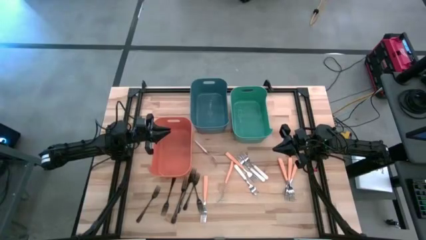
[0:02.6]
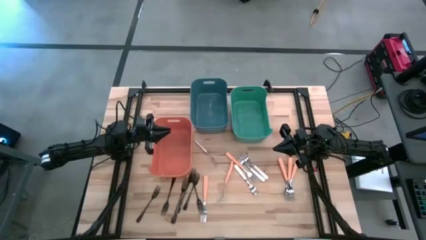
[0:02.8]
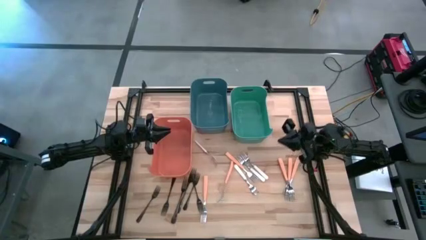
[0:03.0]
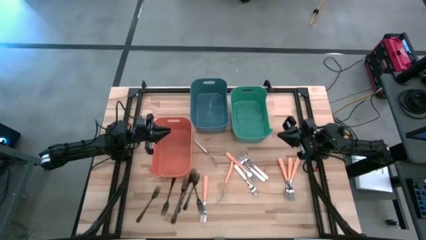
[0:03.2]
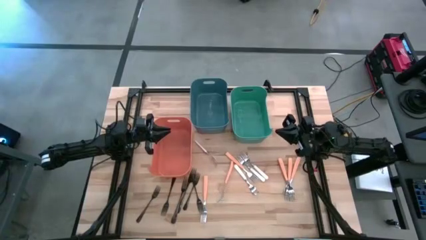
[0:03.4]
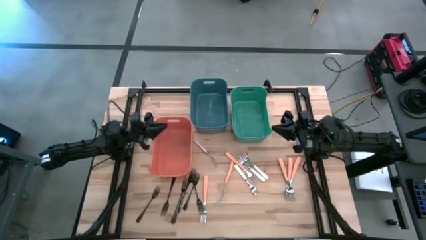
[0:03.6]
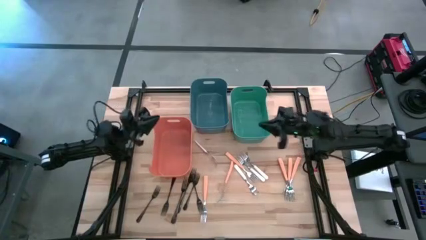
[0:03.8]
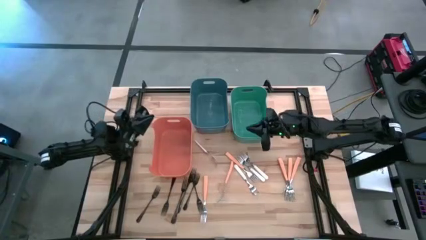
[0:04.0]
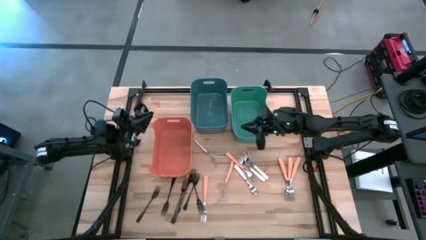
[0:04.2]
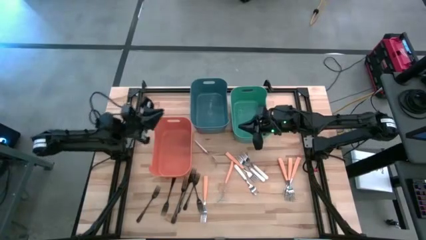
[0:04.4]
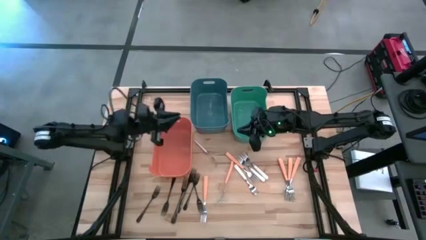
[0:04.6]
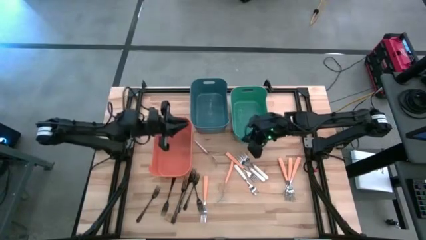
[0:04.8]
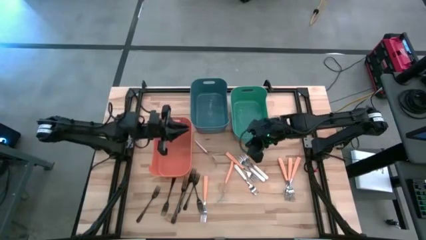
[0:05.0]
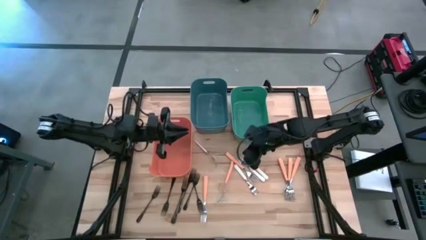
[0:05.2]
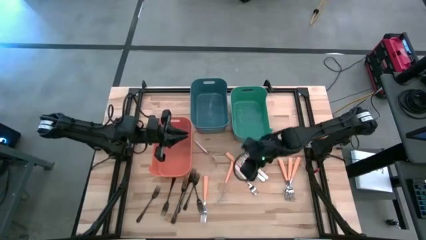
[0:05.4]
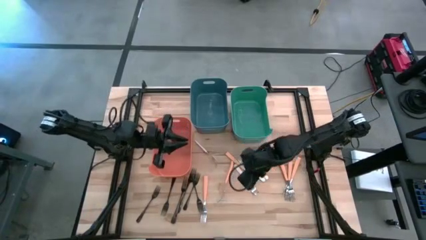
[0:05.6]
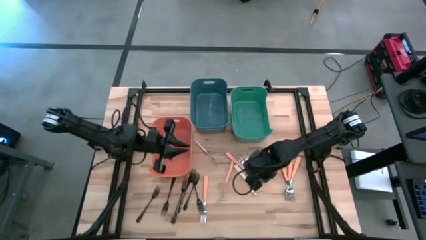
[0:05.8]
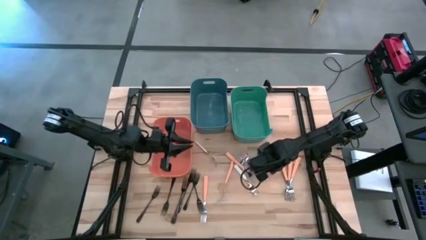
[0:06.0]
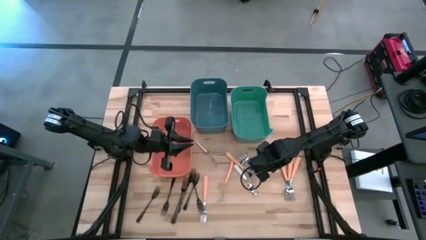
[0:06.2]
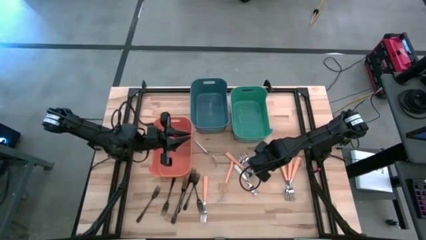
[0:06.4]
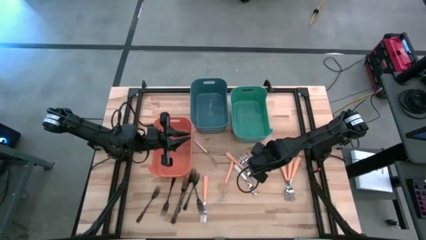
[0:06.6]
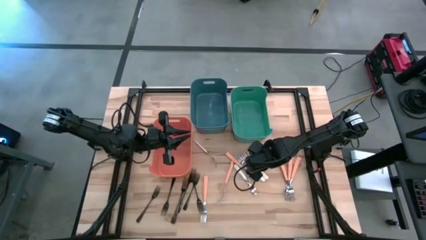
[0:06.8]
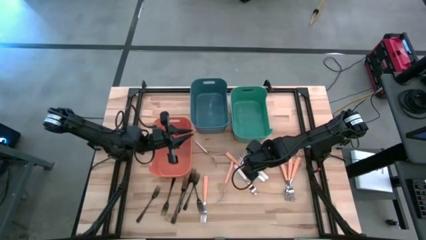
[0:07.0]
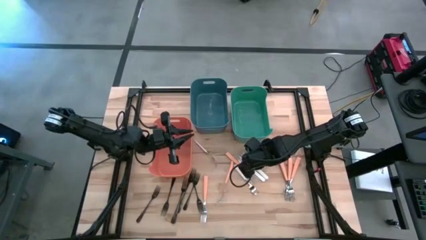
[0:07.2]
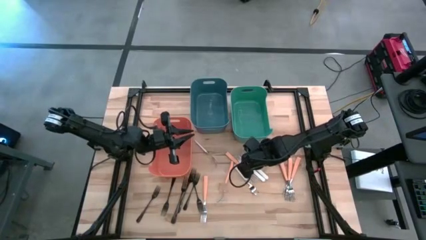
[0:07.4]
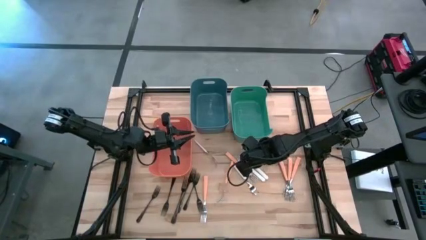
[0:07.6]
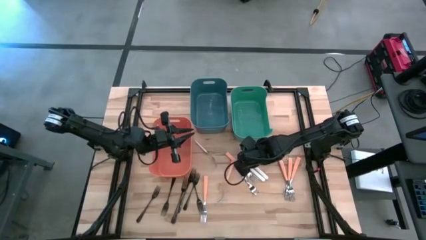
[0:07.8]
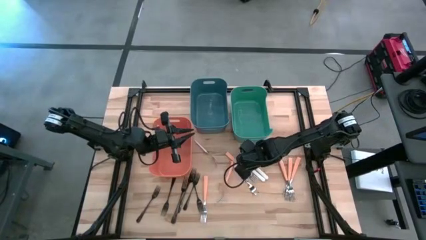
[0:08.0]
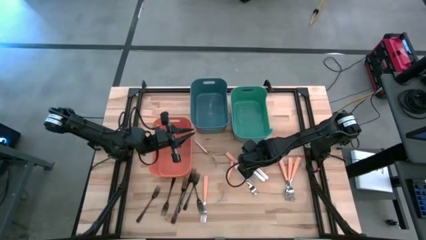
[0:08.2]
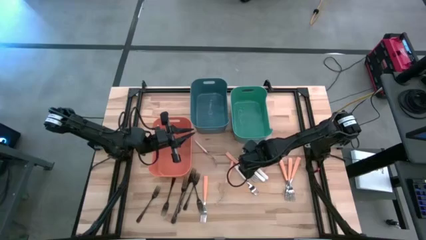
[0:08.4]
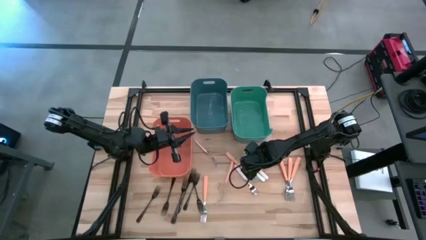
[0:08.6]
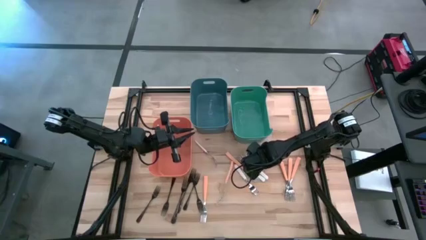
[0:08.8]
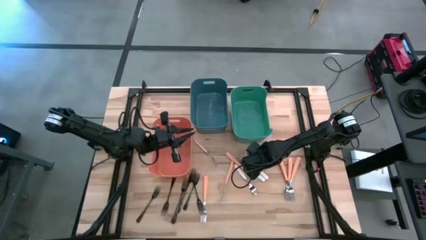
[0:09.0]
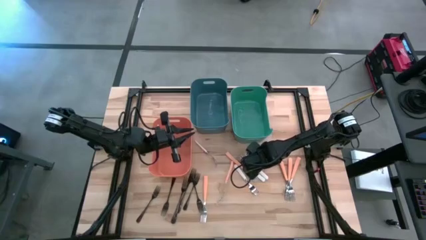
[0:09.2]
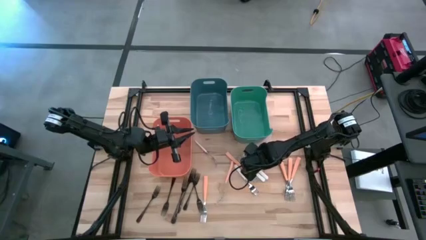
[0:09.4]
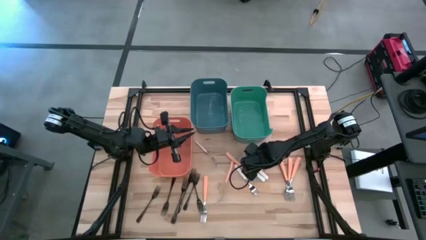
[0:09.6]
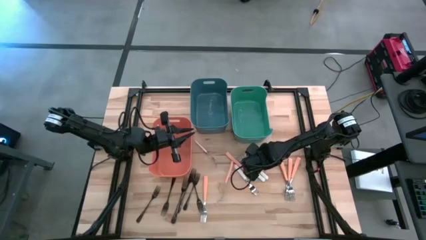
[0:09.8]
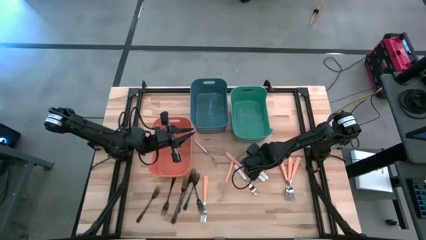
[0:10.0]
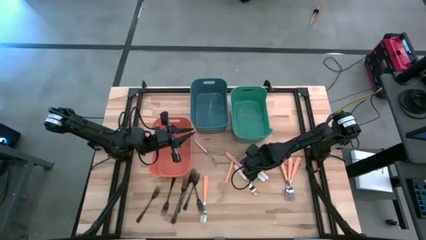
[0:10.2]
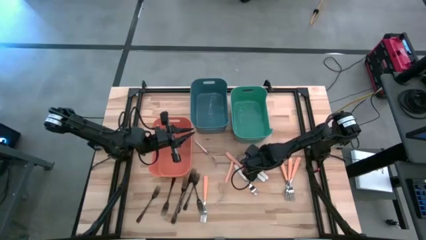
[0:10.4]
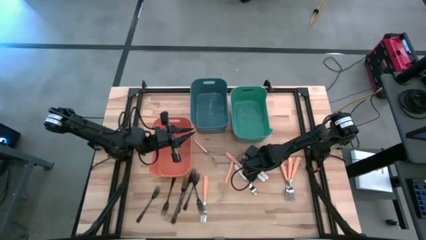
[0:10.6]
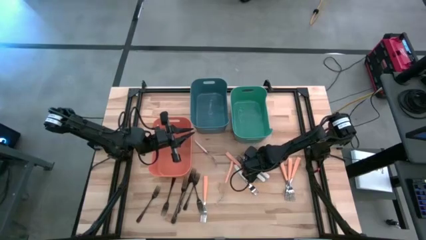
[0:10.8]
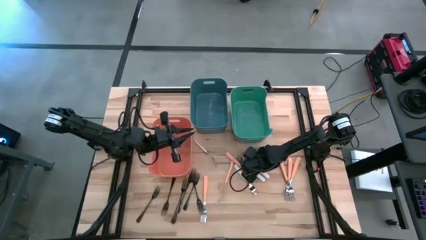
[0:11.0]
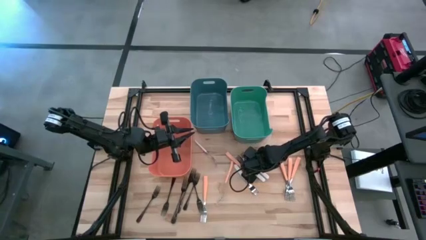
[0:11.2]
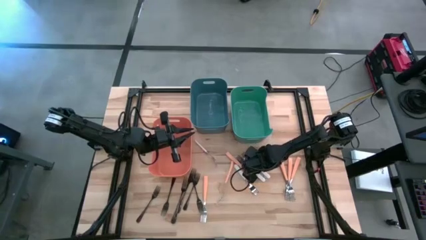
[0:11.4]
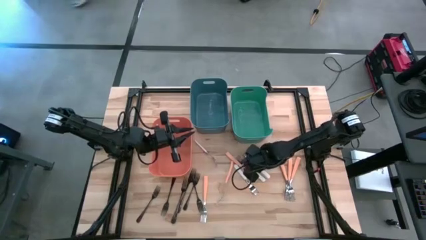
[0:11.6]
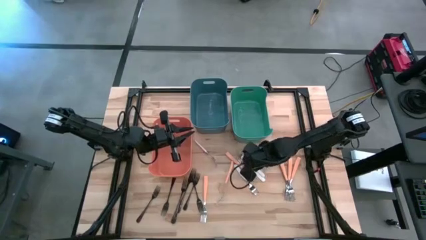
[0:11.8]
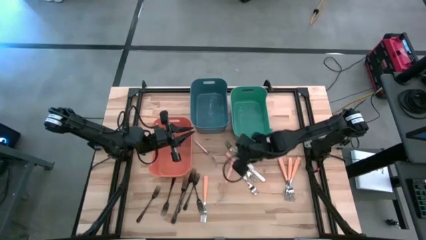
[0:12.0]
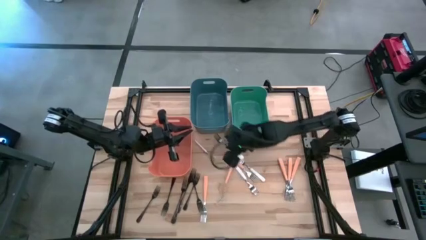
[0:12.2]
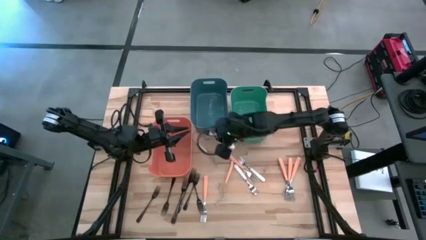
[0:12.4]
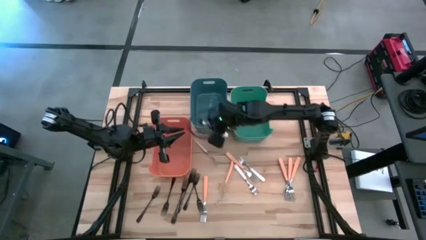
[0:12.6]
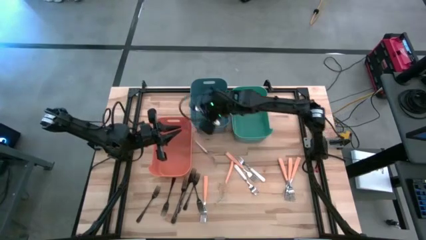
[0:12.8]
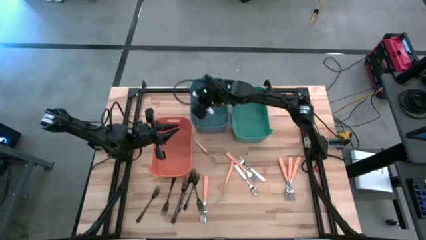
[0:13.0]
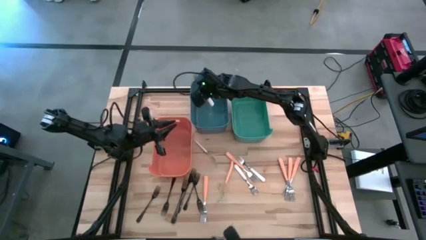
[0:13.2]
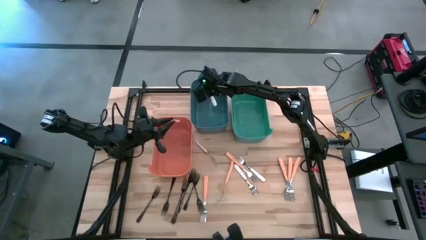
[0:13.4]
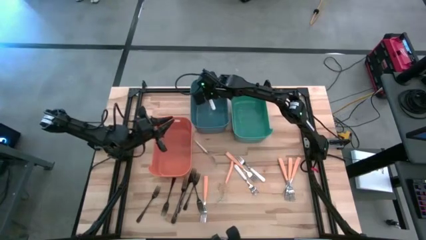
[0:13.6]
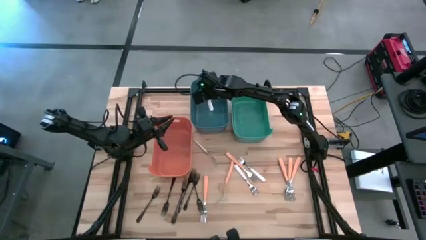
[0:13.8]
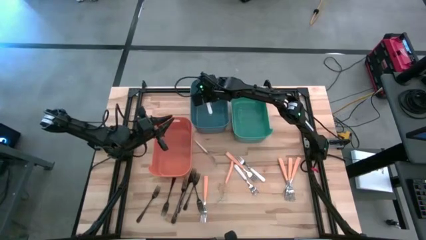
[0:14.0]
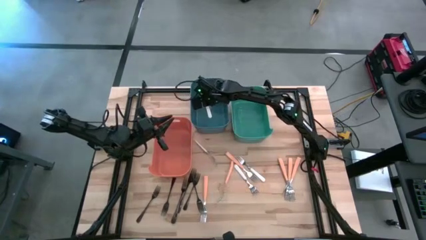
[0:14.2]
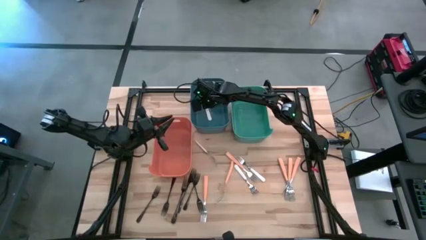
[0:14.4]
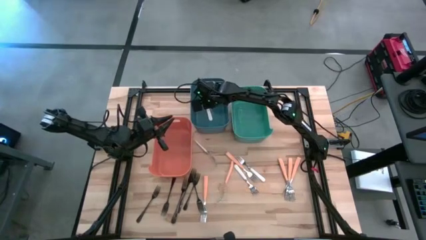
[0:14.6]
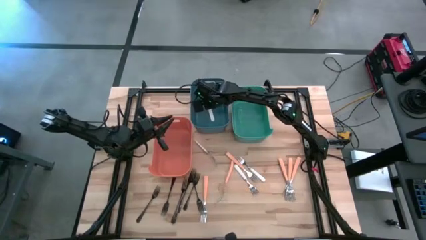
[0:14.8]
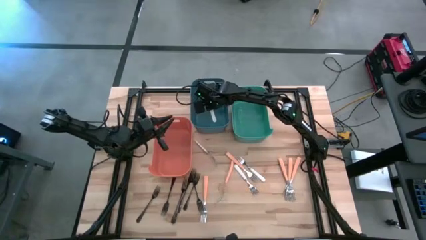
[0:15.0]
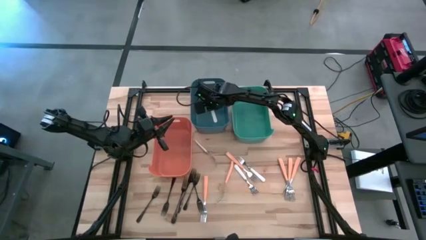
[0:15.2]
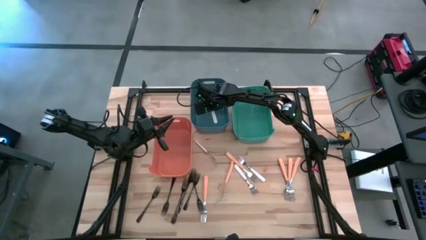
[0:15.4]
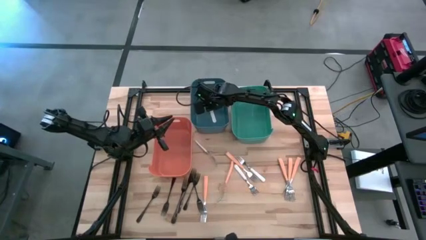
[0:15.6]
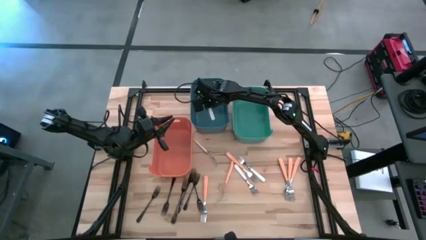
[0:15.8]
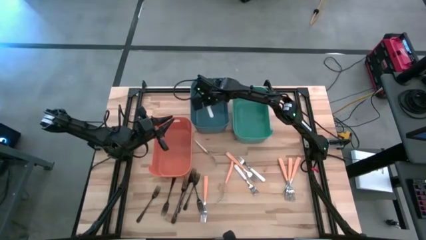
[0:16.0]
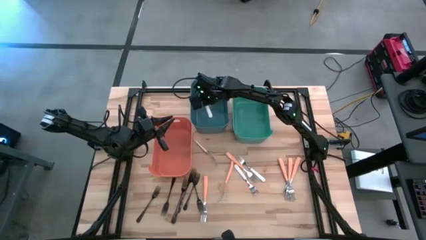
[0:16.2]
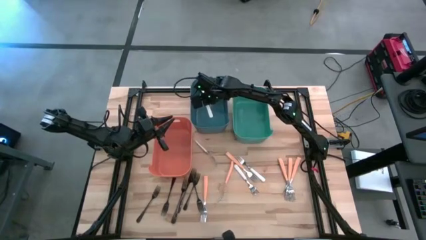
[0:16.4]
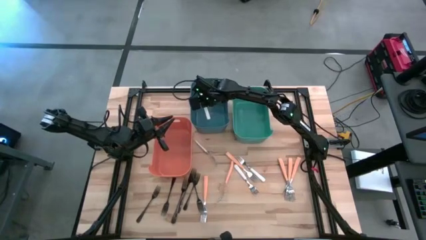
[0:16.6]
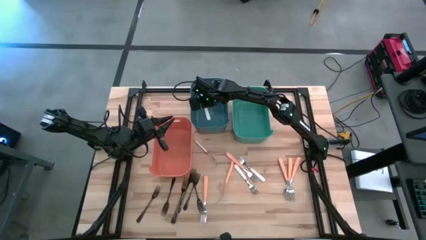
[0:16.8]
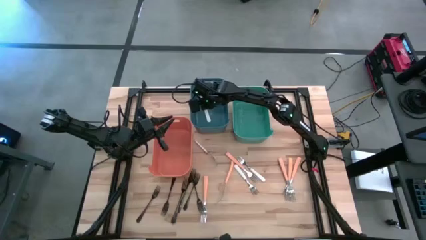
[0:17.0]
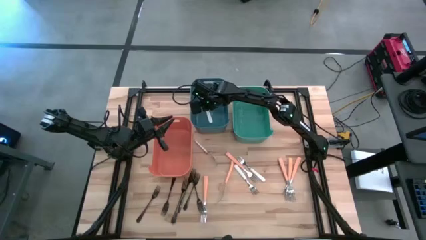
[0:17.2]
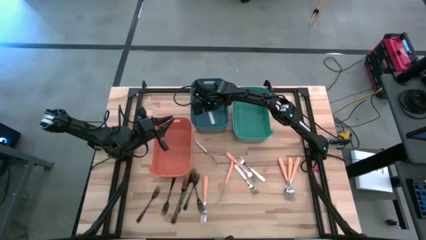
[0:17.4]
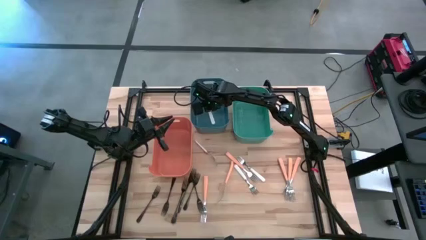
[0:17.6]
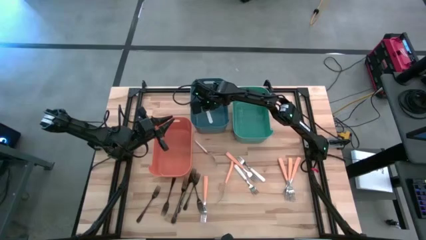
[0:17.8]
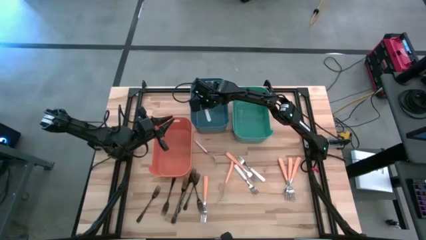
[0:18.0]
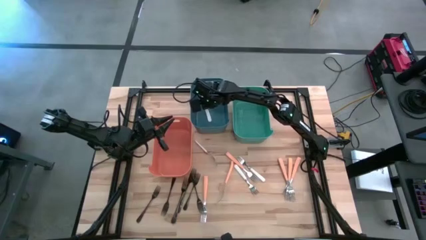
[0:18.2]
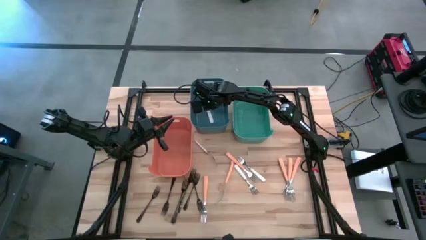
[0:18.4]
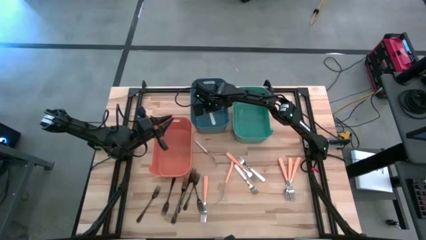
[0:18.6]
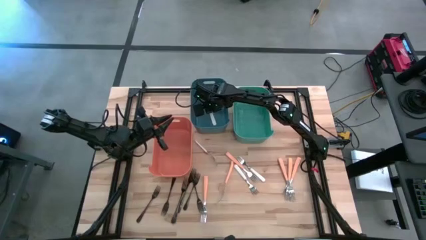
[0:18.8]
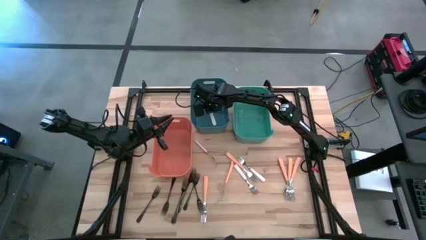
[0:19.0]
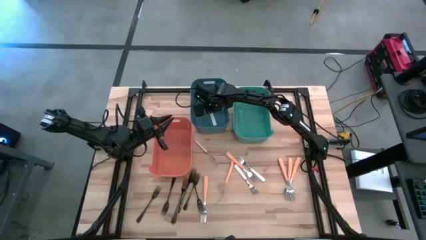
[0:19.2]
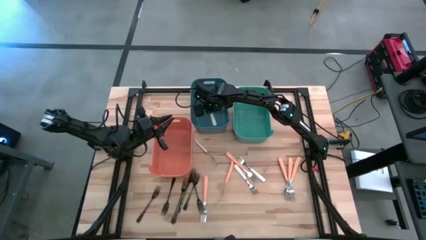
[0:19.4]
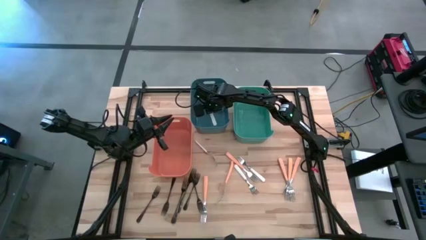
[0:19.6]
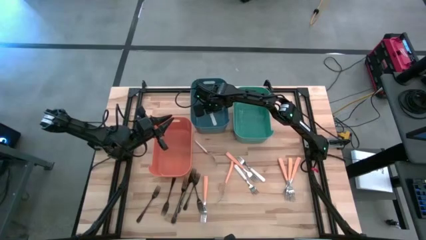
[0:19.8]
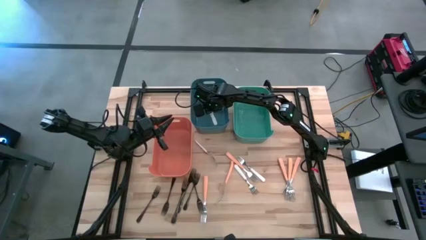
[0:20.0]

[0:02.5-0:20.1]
Task: Sort silverware by color (type)
Put the white fork into the blue bin
